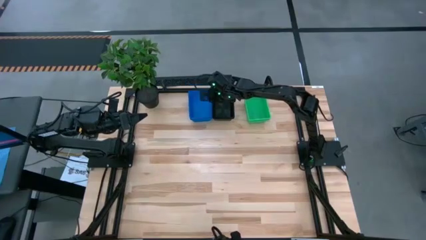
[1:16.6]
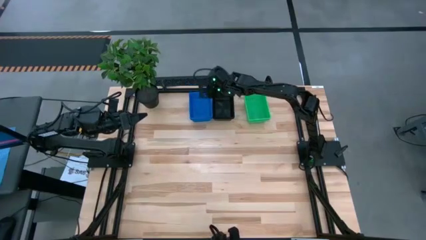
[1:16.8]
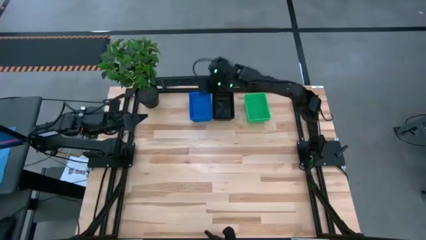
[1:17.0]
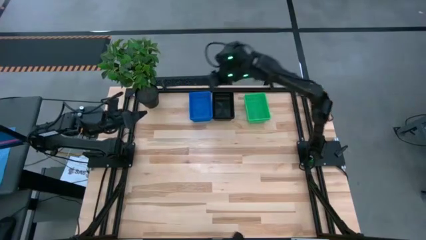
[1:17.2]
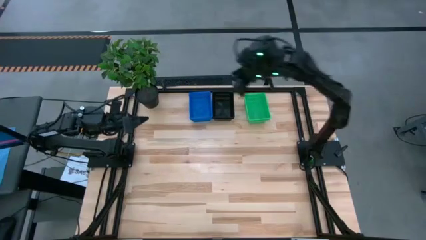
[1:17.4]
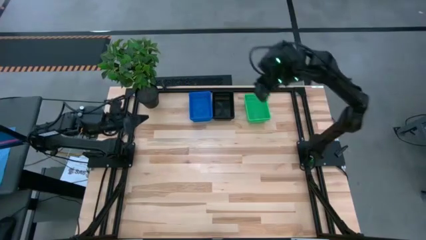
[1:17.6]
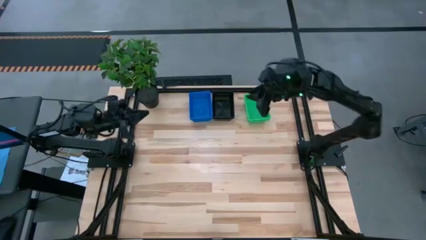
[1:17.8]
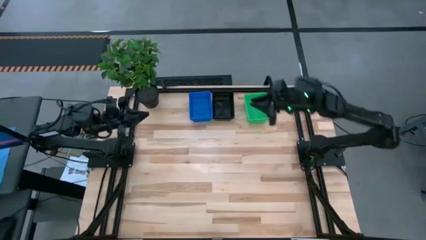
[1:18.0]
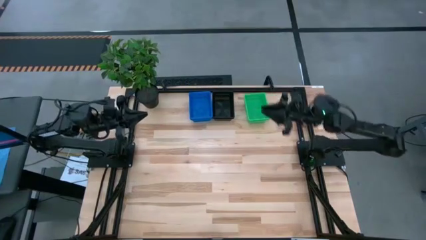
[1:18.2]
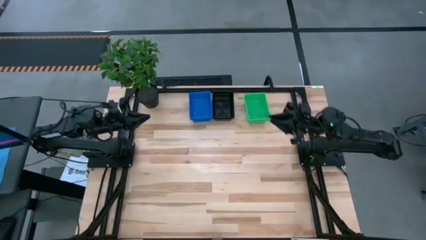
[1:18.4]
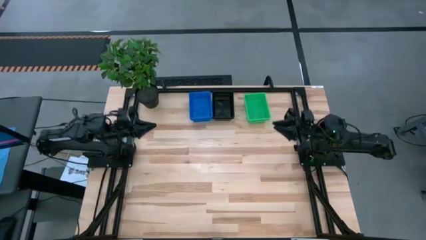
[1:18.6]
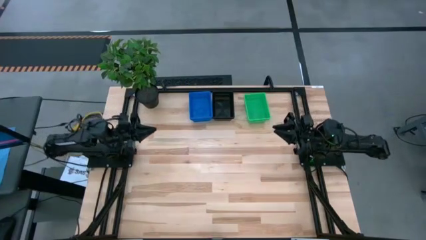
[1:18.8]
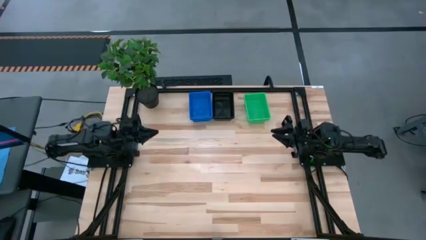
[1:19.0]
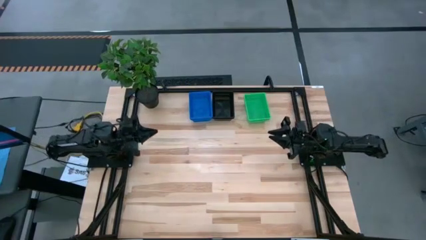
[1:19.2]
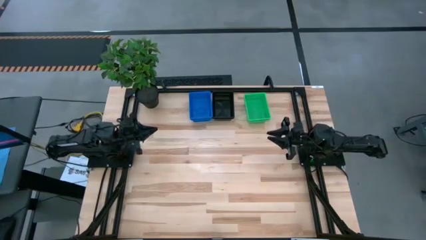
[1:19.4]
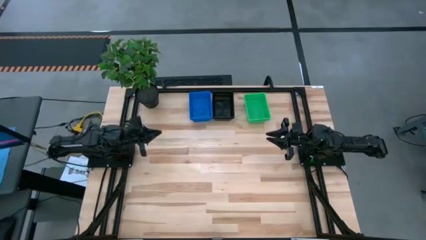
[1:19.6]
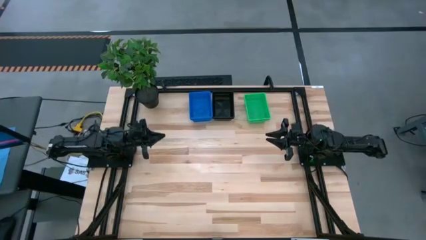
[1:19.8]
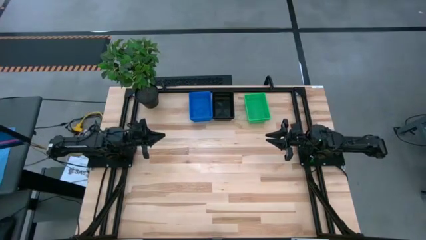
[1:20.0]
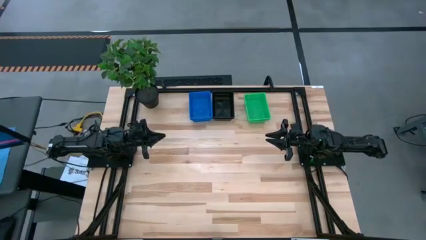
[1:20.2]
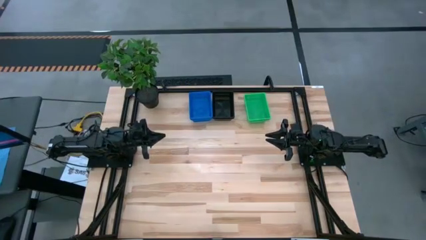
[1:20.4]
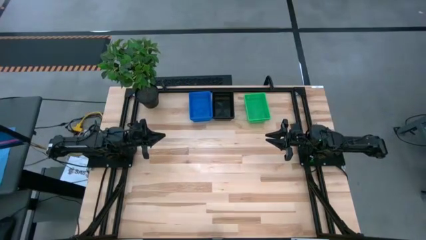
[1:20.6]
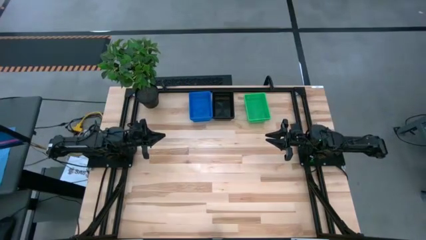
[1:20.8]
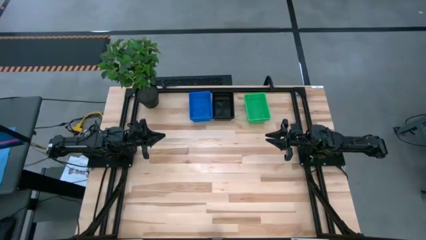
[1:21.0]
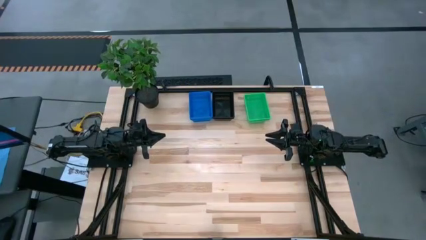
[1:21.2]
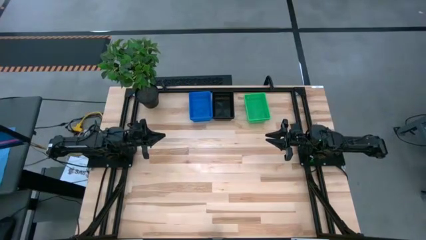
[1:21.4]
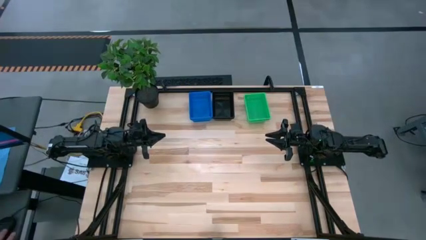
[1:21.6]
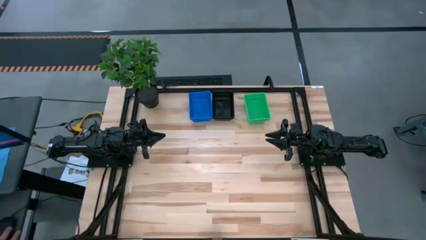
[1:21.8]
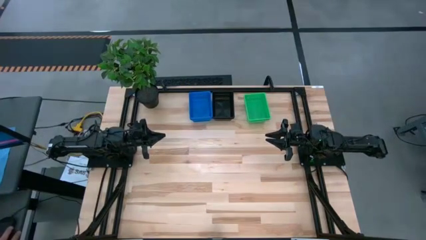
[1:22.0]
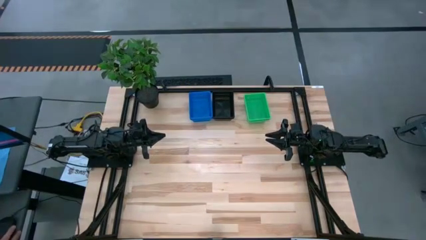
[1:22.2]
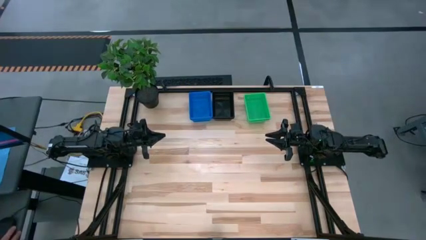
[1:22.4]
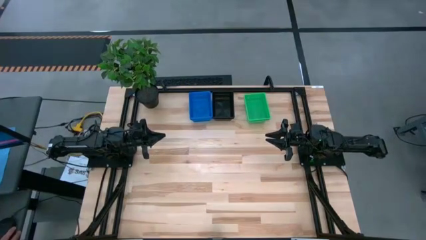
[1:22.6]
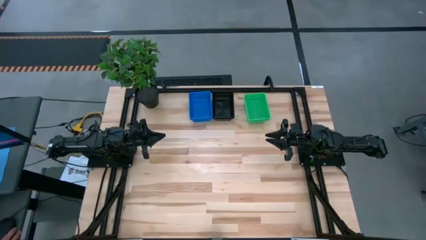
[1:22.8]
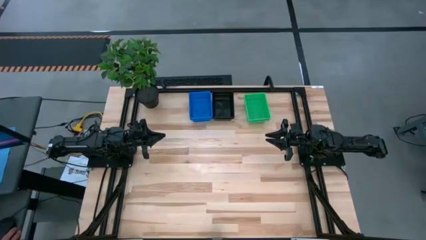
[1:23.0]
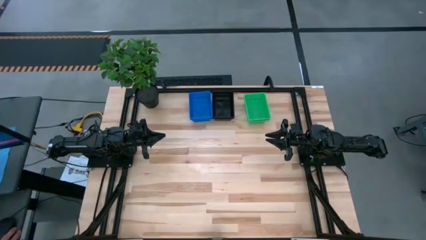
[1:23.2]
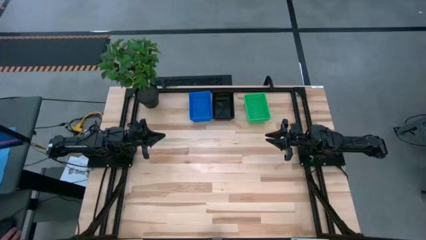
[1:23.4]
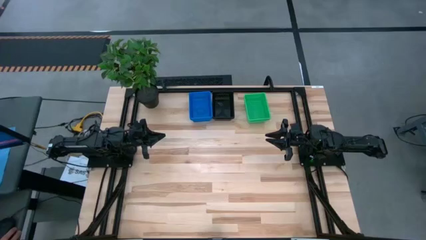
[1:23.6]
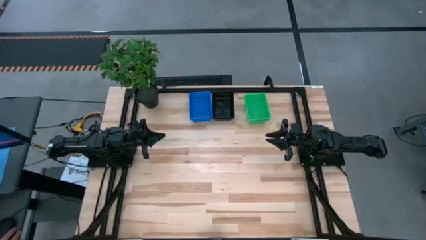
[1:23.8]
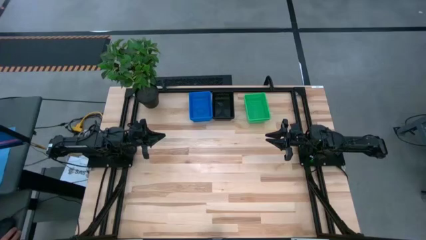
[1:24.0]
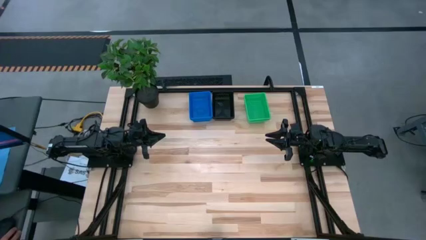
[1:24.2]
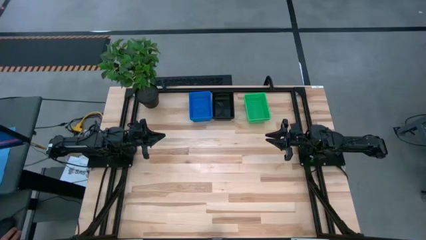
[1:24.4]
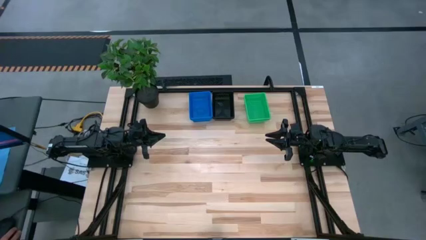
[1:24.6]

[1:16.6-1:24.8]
Return to Home Position

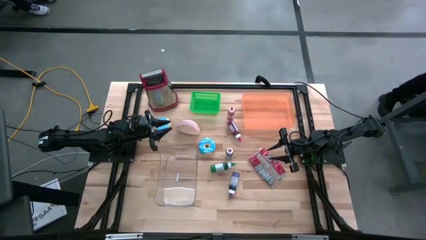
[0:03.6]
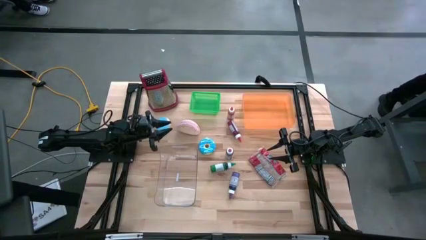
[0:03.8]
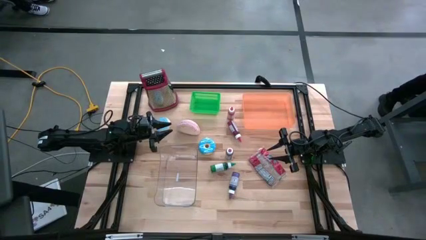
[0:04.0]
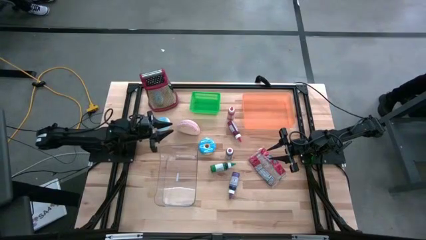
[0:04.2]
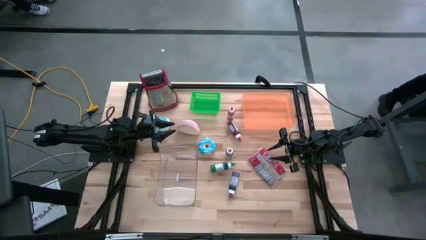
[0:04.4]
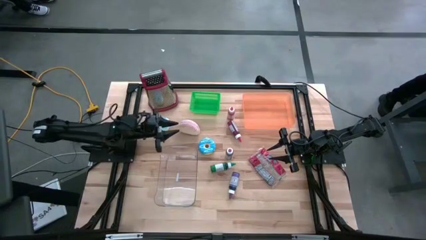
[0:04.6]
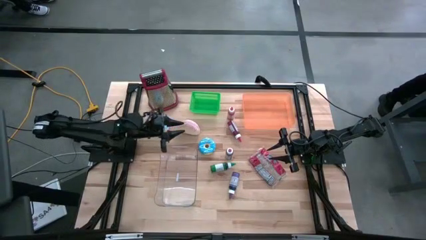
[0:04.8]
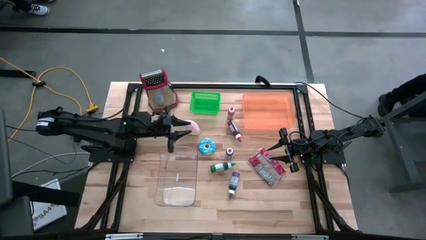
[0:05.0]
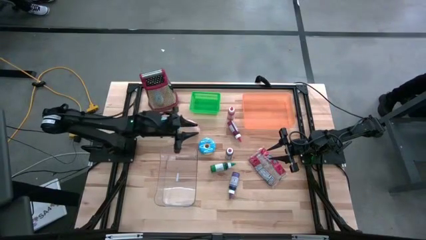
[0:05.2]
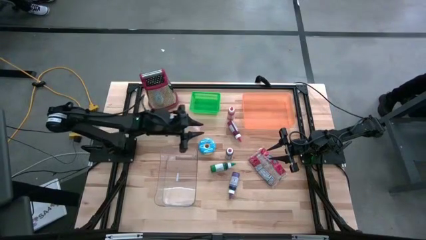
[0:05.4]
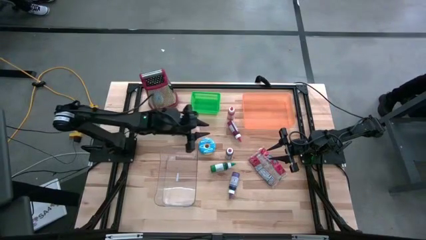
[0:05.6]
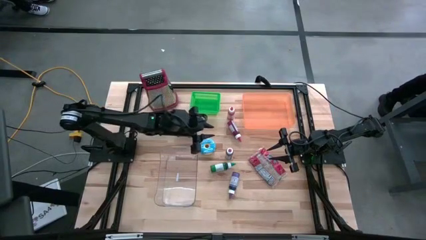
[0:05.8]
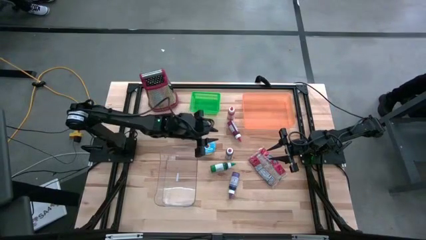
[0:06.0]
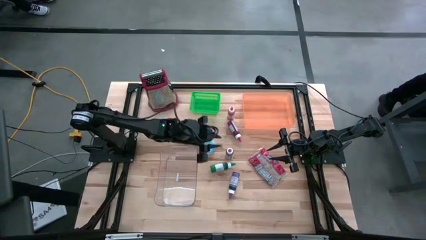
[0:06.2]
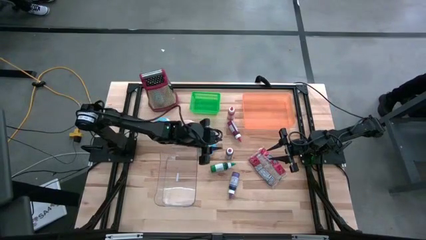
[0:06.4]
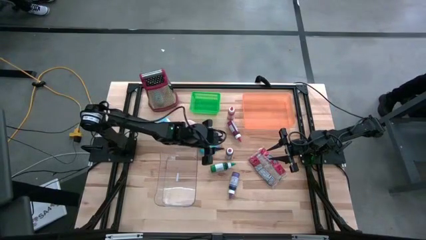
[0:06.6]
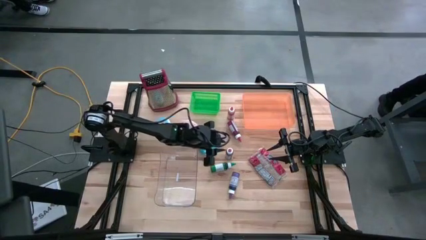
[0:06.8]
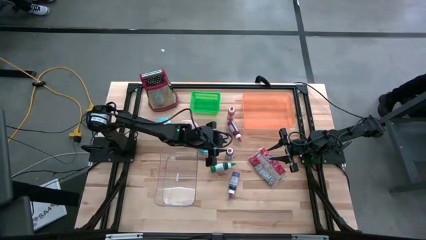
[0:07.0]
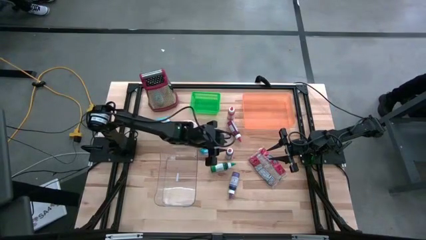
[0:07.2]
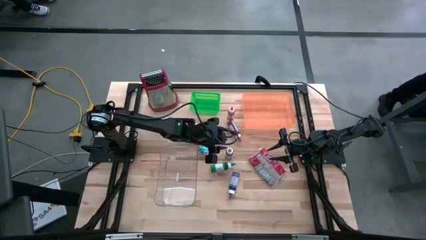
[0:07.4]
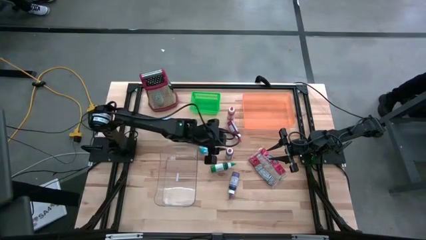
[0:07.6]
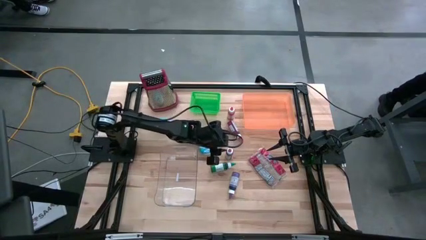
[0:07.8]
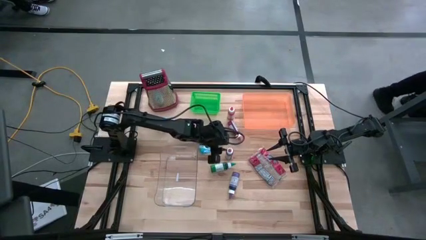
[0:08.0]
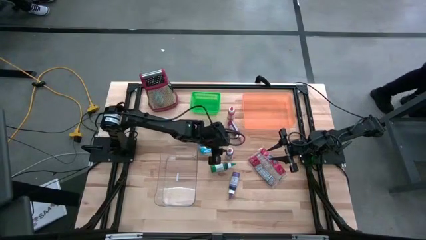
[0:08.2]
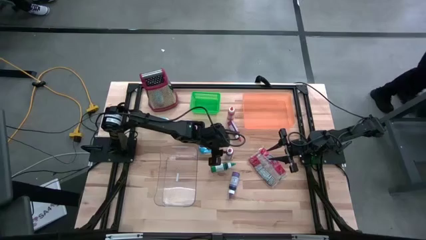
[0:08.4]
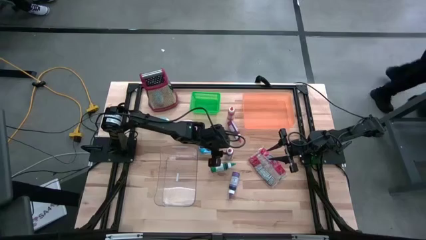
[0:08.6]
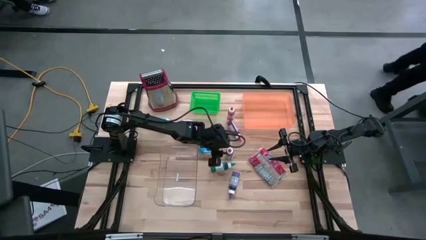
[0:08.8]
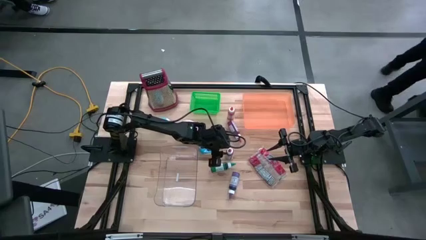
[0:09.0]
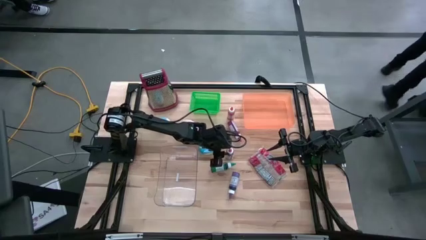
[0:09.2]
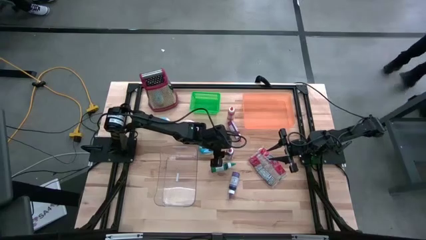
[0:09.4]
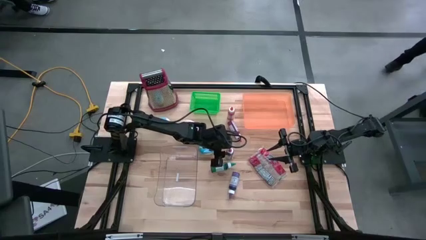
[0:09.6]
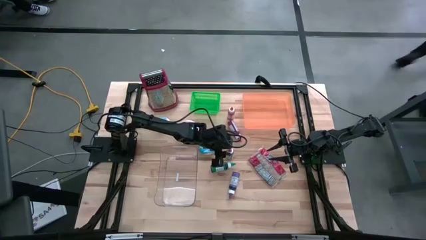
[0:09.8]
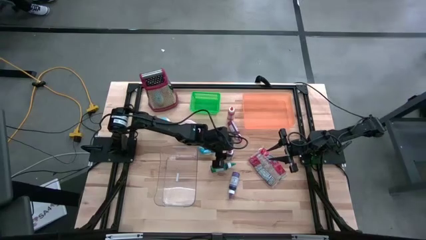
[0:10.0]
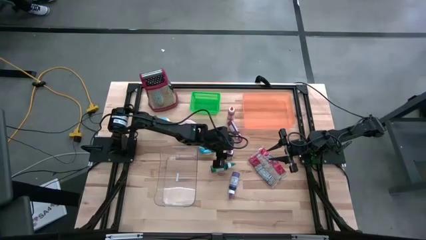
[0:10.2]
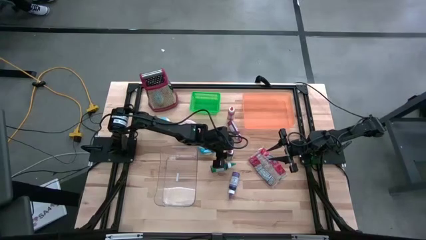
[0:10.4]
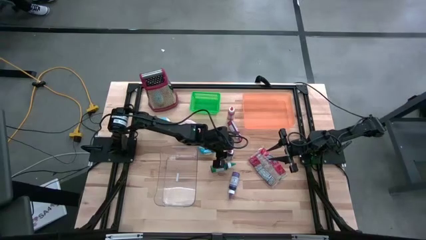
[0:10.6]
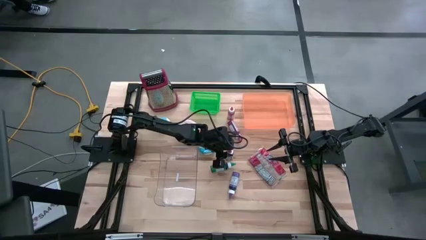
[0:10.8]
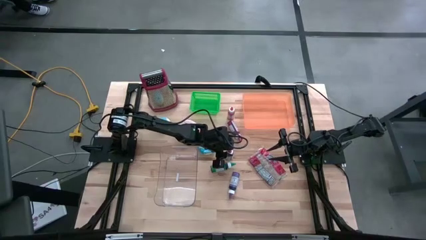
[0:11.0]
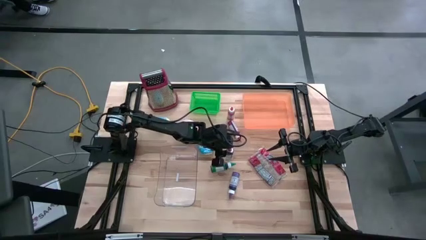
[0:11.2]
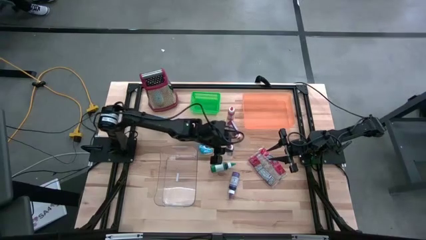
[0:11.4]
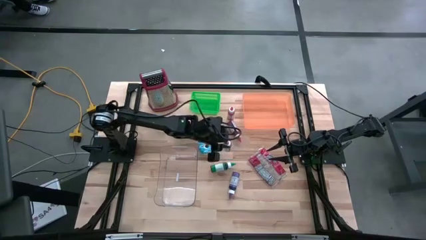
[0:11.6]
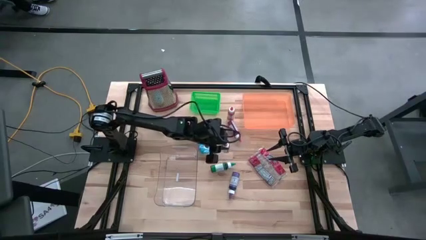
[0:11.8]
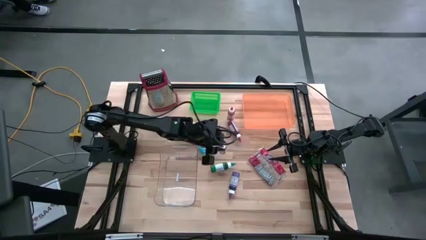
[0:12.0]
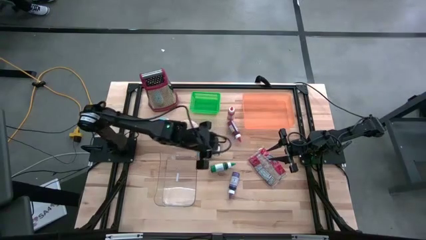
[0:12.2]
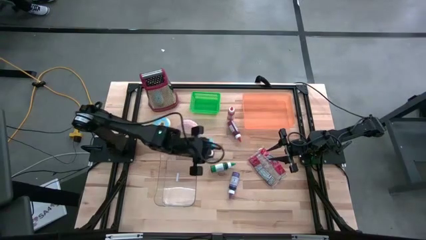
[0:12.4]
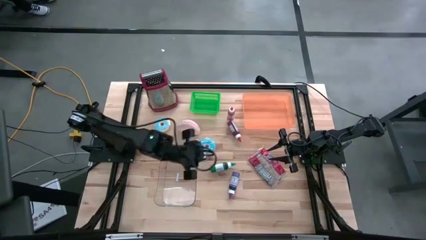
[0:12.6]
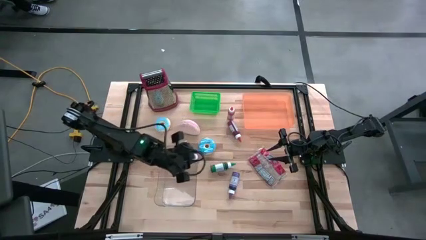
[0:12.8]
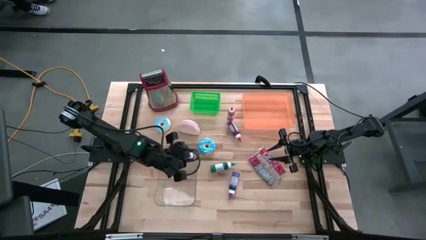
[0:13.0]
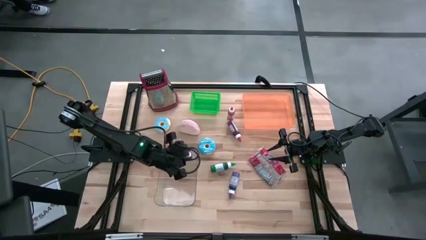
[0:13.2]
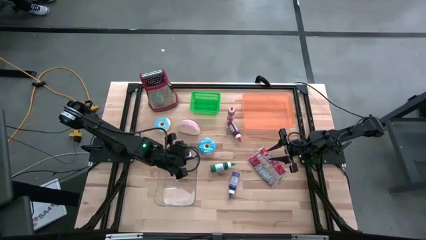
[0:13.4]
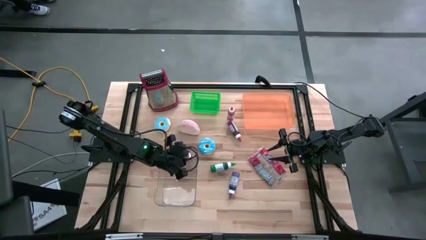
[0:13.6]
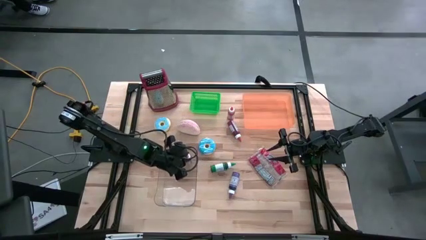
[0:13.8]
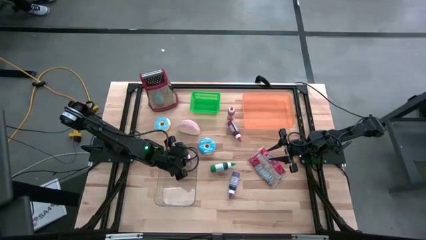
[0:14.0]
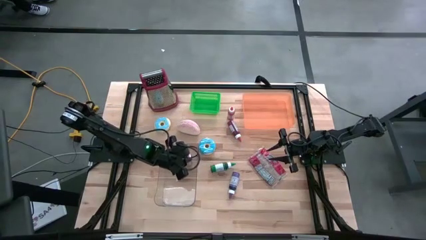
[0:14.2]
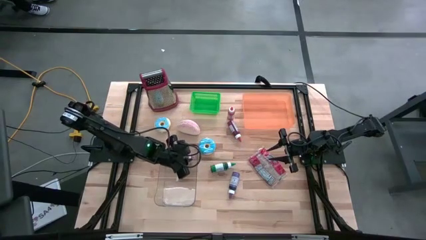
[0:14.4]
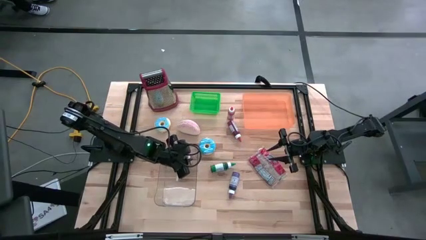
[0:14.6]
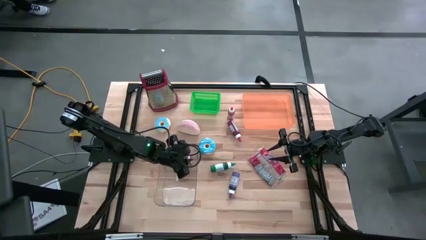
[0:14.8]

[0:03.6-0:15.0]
Put the pink food coloring bottle into the transparent bin
